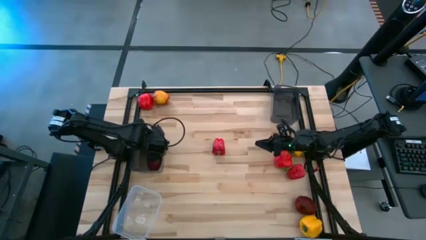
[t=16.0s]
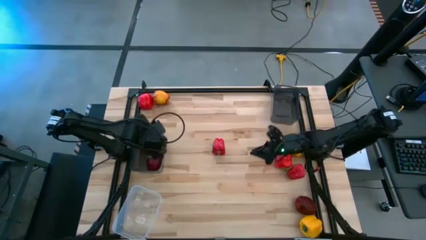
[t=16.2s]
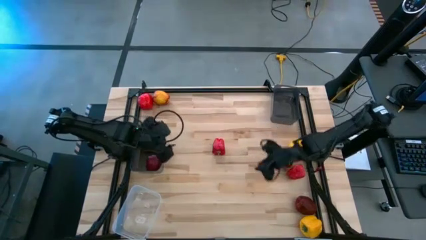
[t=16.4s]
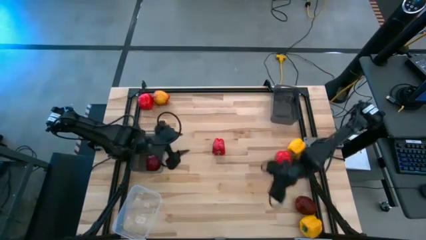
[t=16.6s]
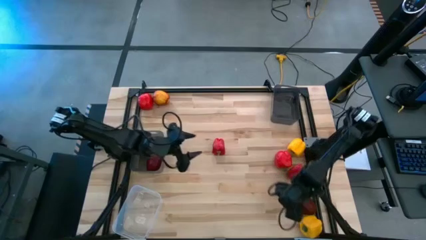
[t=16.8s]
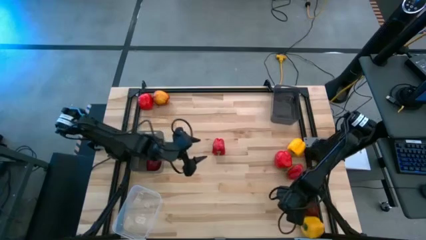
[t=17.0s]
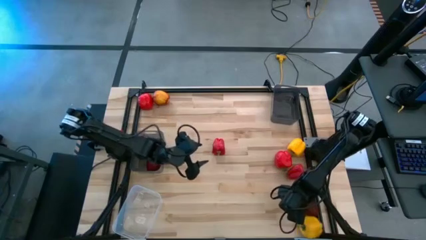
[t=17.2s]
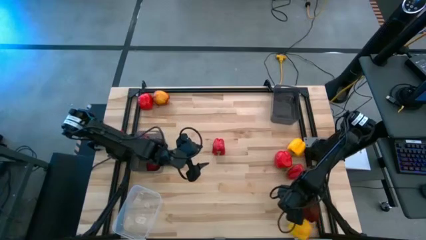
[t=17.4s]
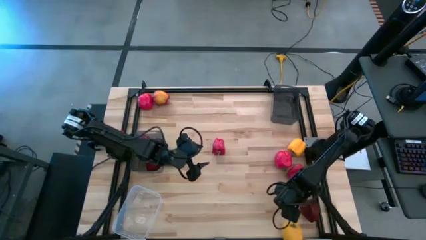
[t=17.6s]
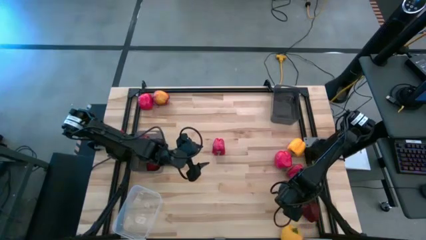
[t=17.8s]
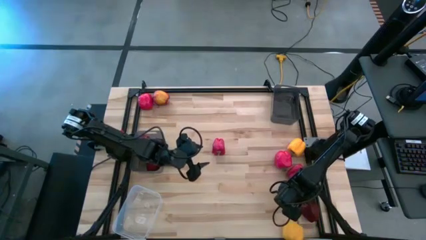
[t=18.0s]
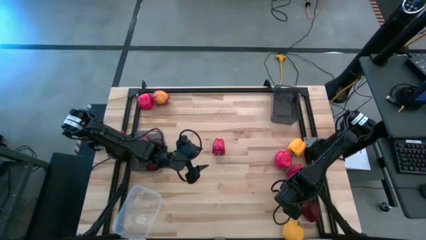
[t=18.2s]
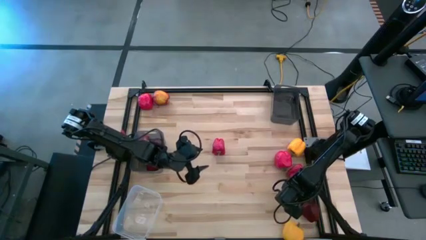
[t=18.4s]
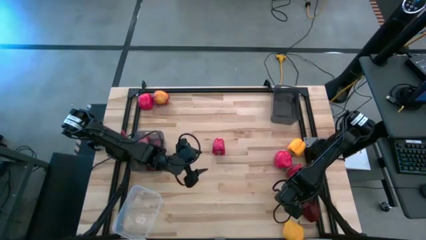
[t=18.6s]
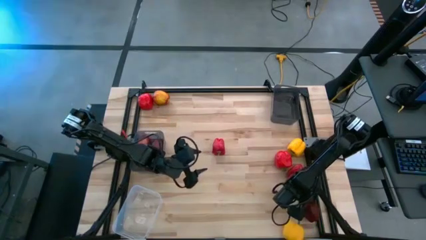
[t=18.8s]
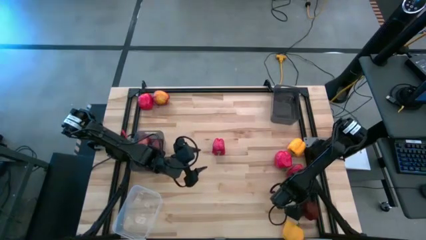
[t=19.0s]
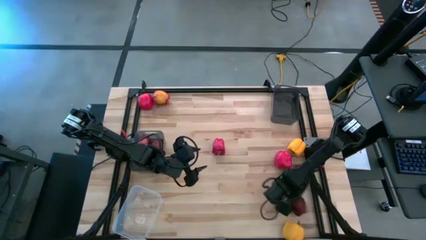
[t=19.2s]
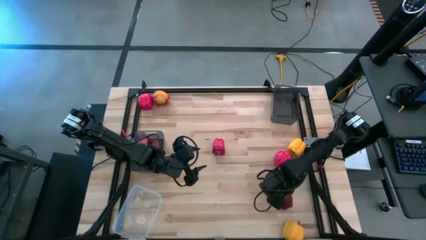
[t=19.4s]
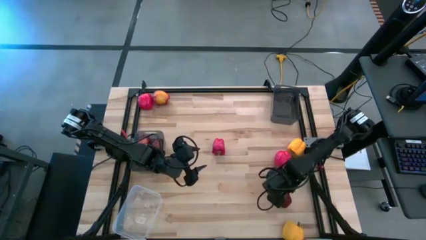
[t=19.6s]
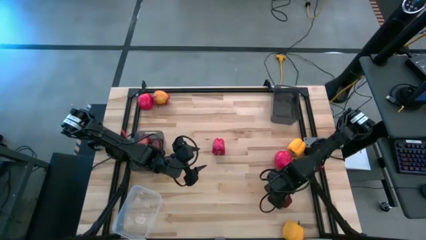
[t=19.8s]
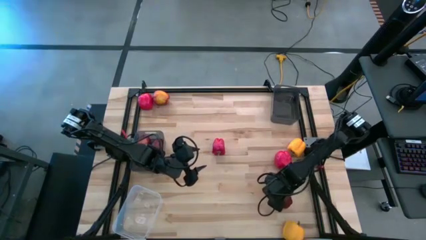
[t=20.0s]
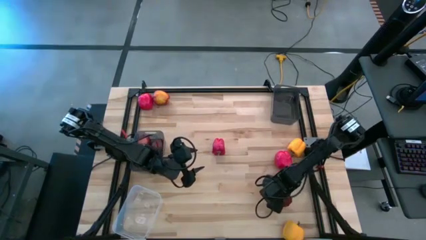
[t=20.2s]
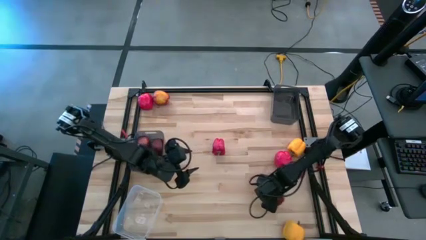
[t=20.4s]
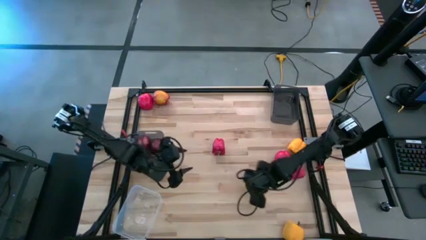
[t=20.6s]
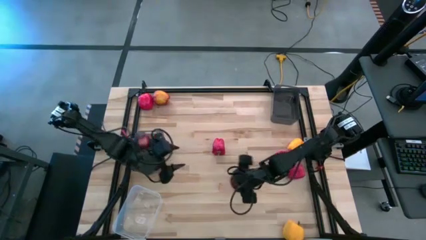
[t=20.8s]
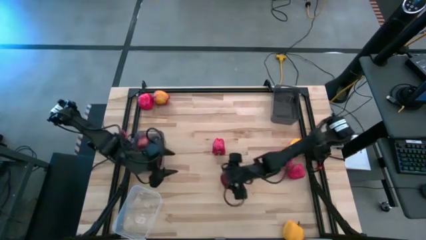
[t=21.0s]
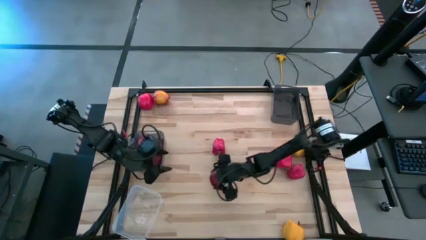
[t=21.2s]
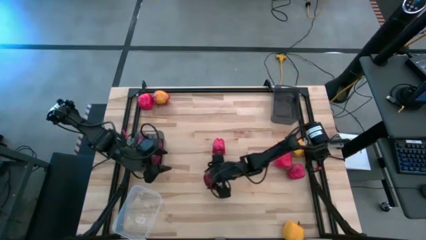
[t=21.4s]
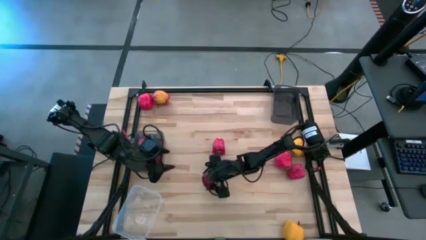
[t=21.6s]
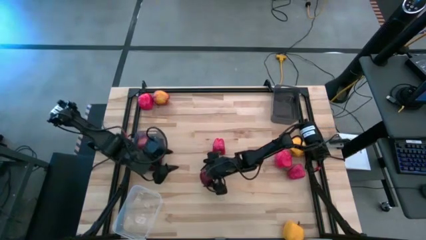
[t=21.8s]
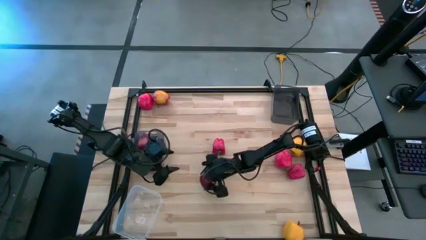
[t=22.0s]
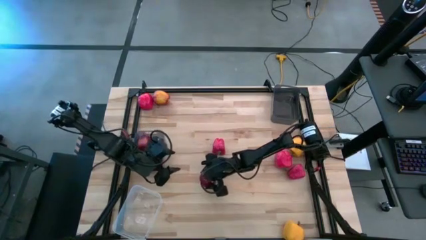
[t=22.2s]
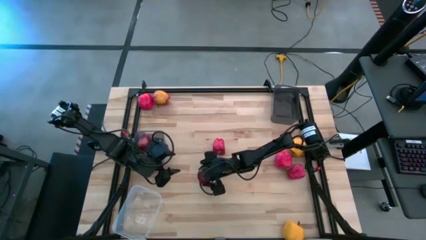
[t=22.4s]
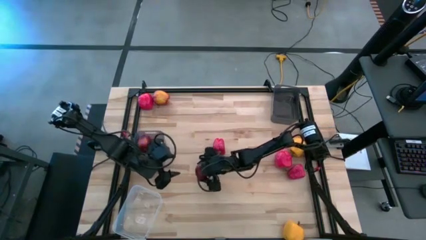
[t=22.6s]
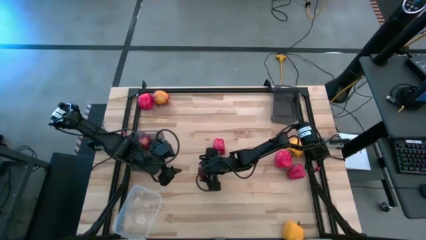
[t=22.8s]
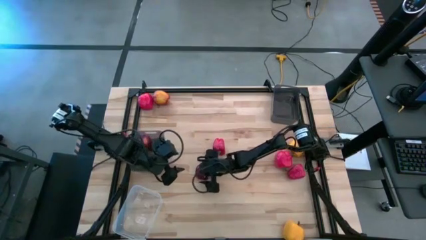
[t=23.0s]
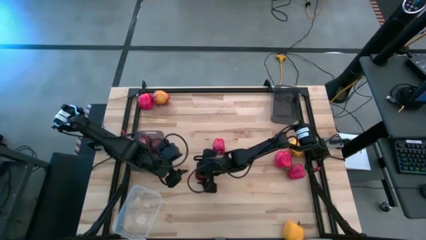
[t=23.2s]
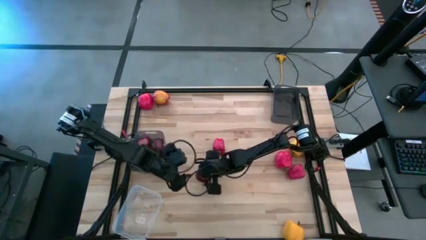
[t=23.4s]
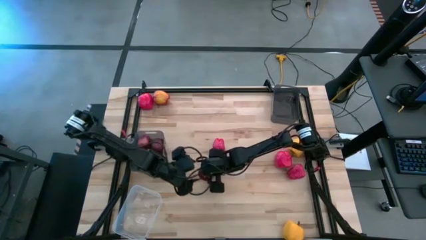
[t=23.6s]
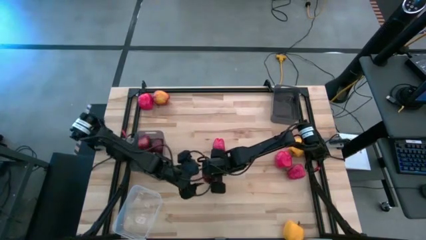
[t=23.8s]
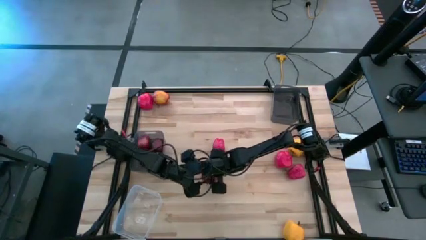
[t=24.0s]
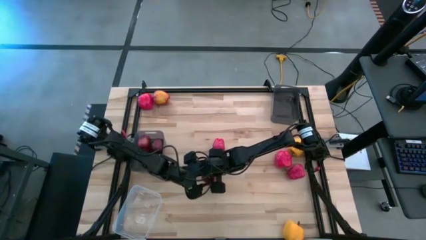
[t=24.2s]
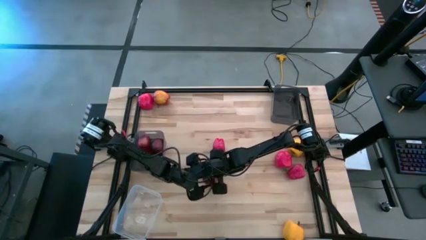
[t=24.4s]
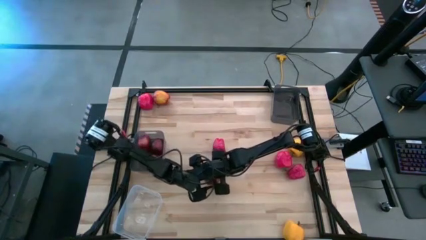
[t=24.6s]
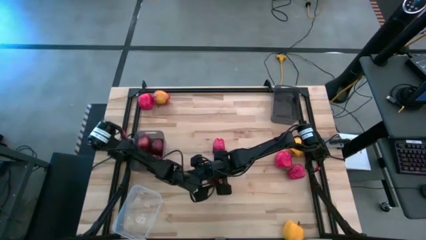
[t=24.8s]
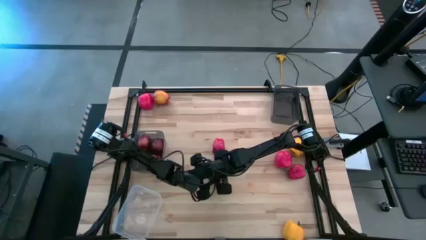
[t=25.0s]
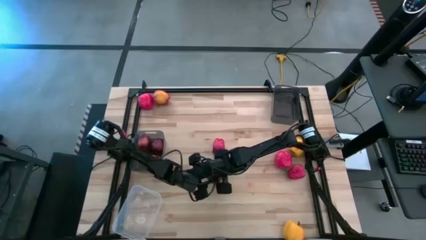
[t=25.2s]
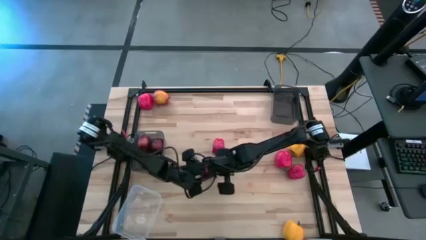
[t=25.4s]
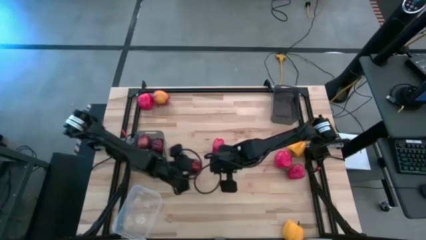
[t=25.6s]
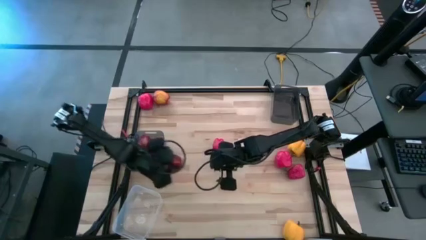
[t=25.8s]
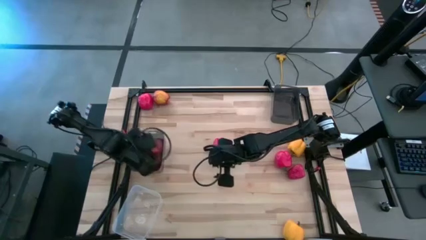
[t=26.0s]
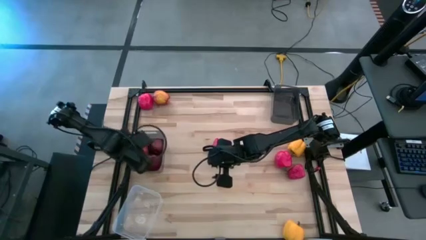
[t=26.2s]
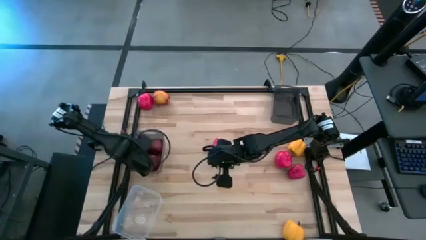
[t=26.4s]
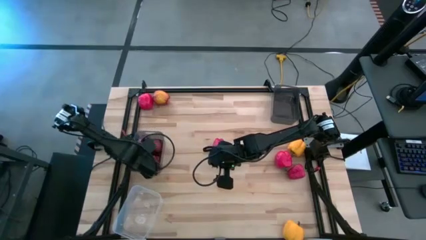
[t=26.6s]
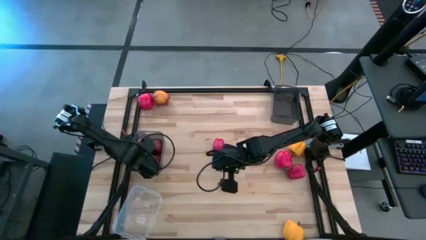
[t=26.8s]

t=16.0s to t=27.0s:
Task: Sort produce into baskets
Put the red apple into the left black transparent bin

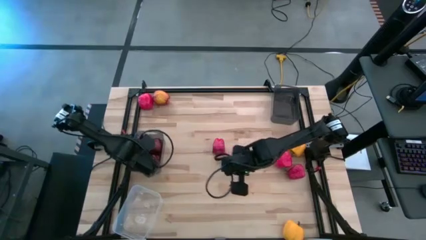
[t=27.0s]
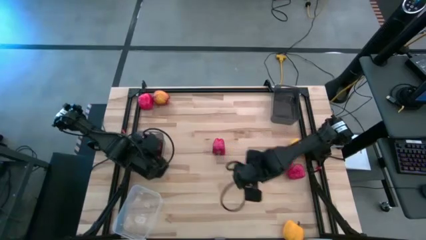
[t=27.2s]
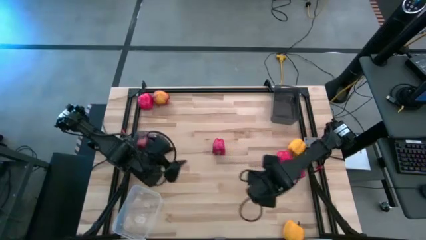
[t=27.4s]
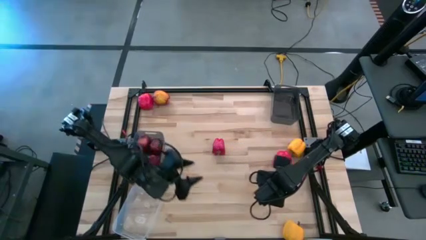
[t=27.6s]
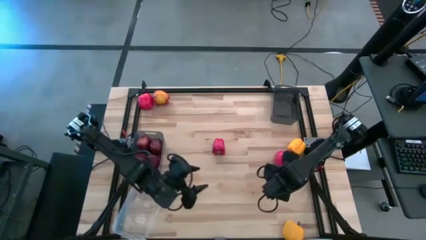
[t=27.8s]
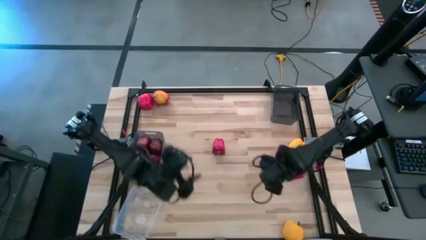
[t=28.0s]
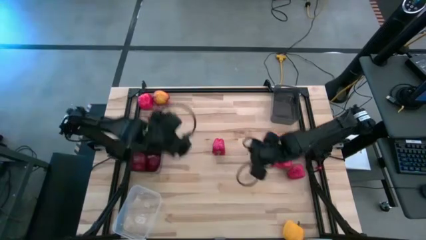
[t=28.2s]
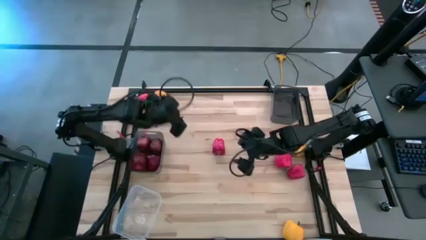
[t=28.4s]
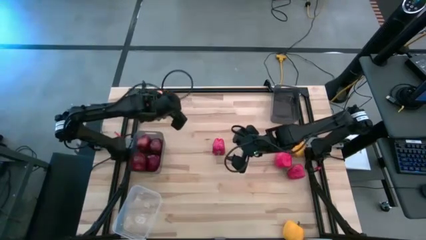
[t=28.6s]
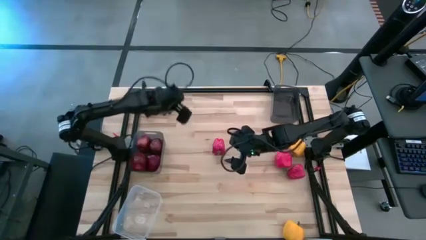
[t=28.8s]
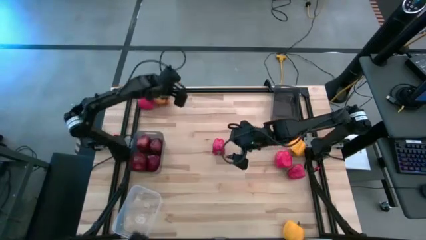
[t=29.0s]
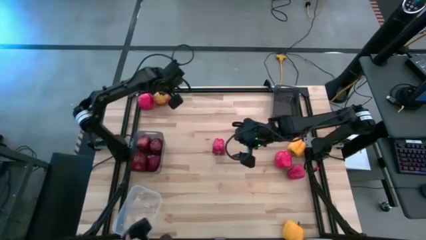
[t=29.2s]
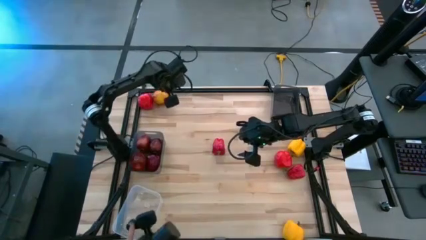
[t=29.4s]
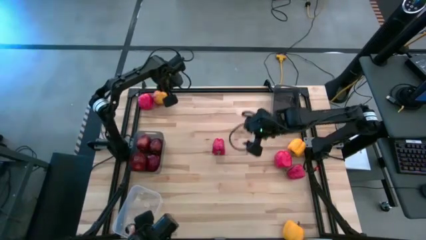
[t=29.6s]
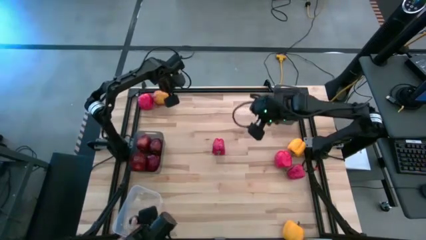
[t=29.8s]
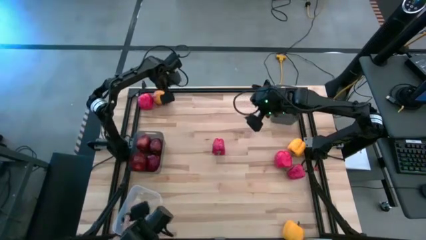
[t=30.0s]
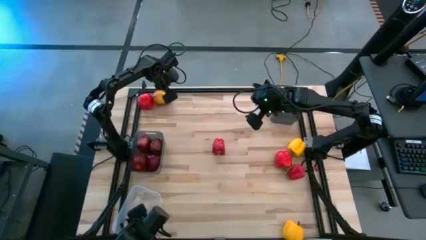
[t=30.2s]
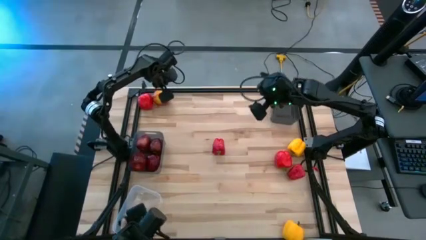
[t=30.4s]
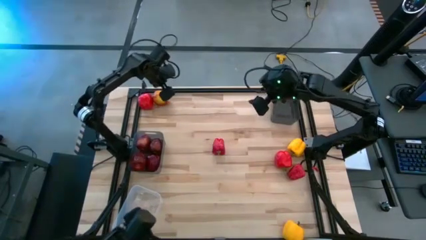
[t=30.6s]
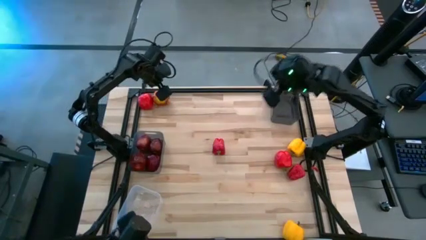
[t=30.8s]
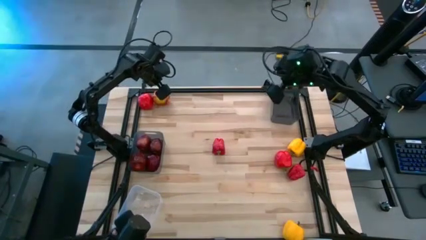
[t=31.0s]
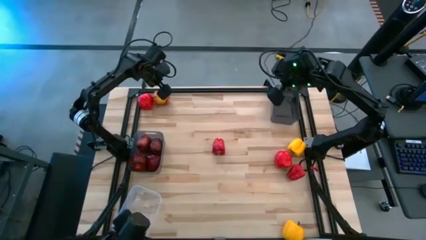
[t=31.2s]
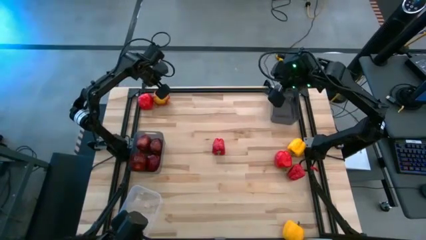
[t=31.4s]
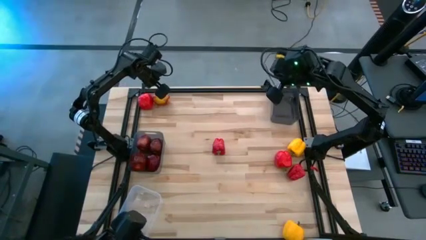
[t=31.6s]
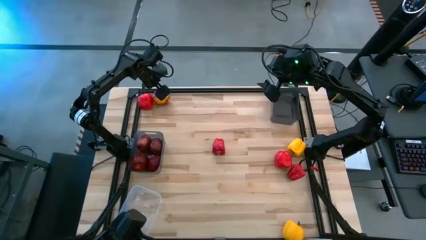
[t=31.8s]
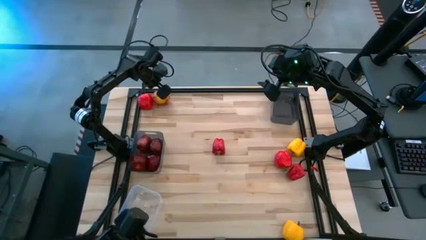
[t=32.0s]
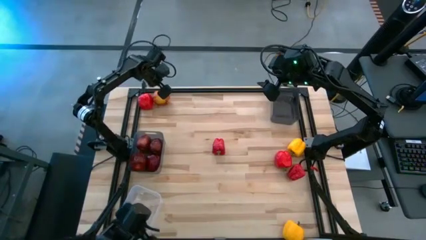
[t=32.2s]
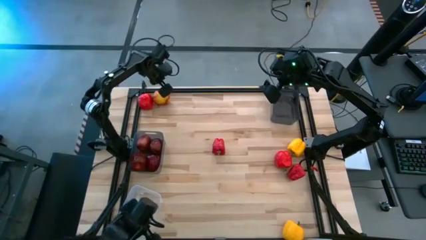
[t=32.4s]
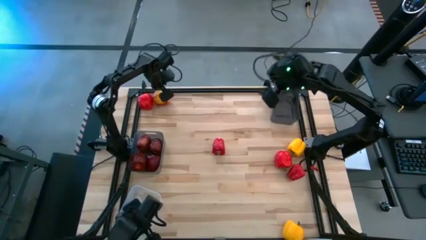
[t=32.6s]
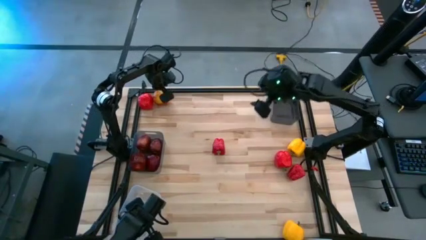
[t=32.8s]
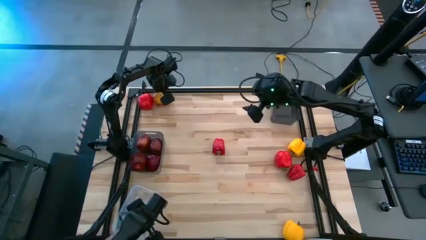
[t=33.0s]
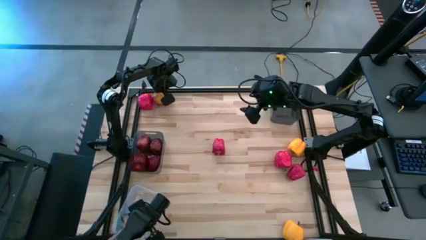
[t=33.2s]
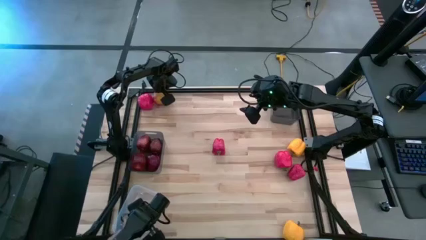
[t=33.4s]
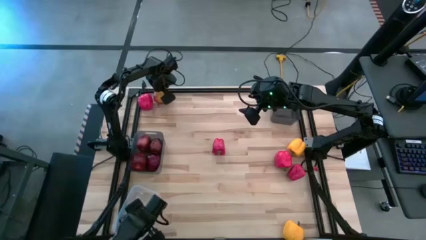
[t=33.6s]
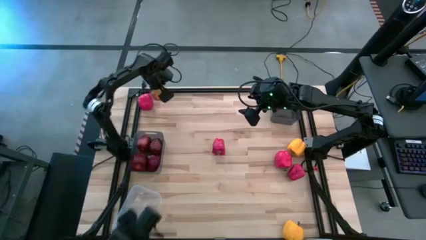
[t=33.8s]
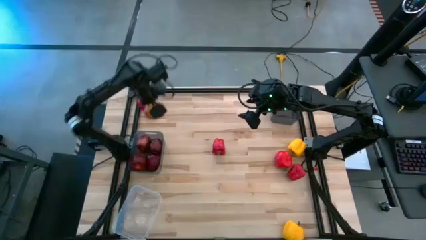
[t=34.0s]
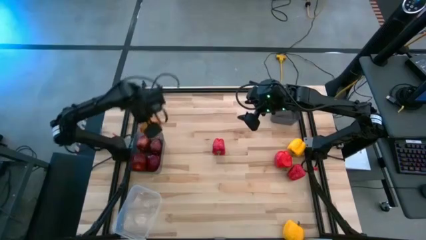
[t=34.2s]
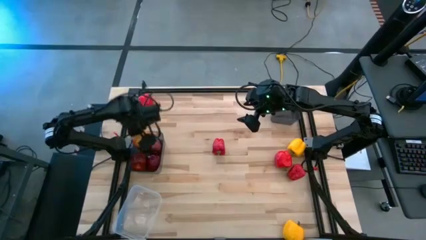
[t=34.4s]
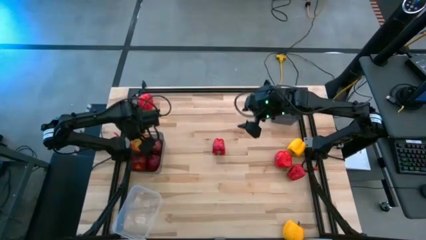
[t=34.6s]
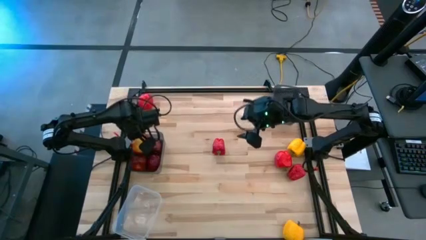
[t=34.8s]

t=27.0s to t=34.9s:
Put the red apple into the left black transparent bin
